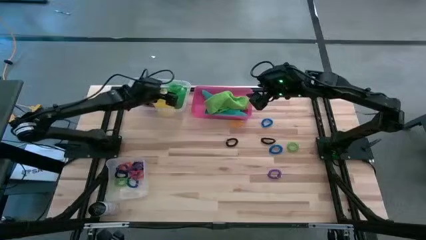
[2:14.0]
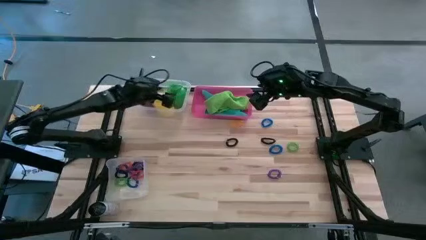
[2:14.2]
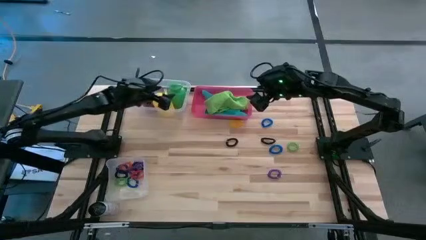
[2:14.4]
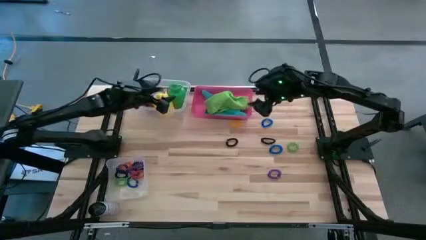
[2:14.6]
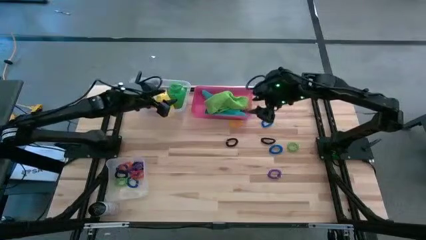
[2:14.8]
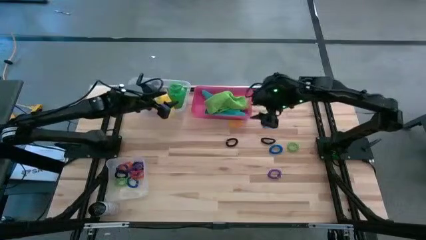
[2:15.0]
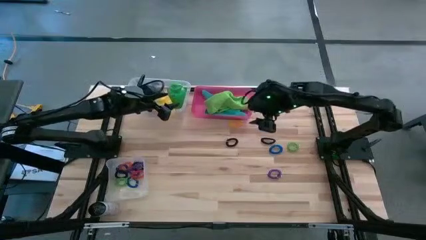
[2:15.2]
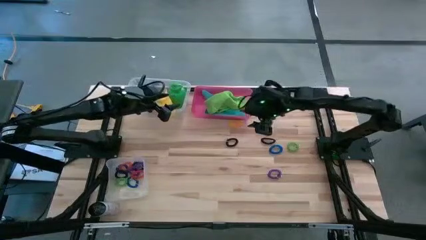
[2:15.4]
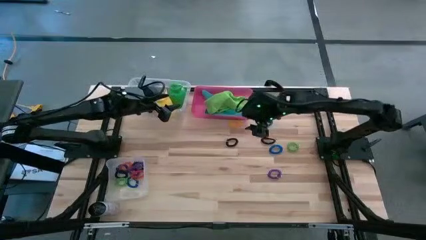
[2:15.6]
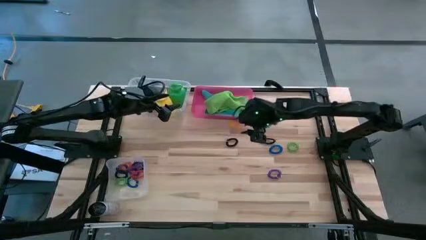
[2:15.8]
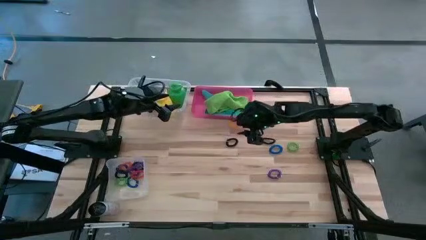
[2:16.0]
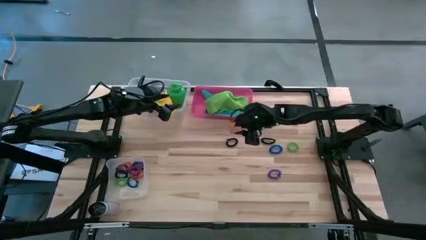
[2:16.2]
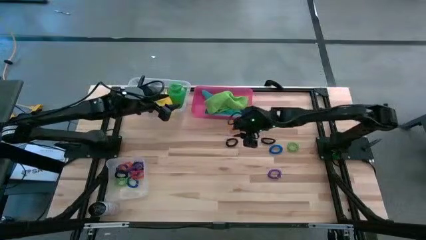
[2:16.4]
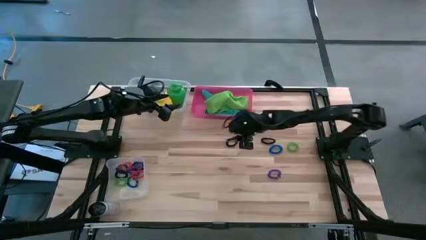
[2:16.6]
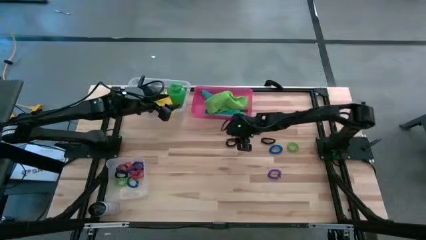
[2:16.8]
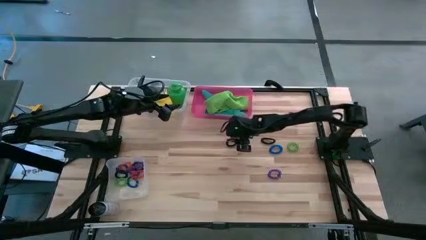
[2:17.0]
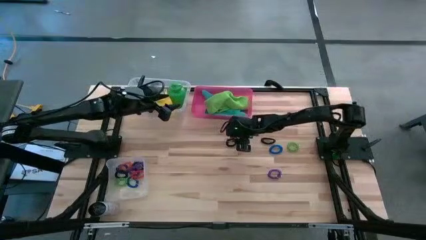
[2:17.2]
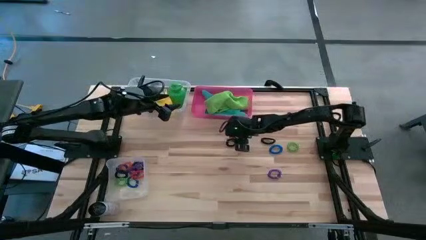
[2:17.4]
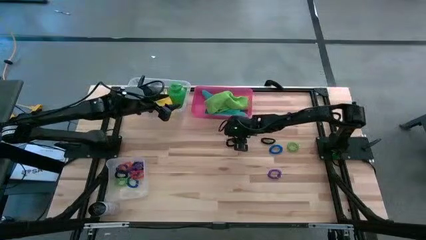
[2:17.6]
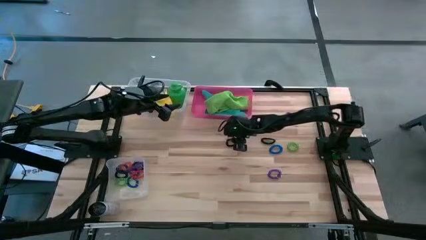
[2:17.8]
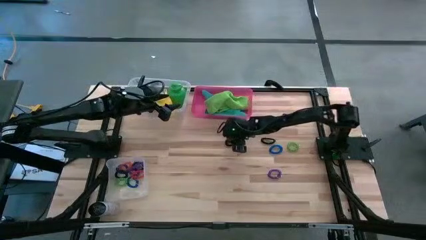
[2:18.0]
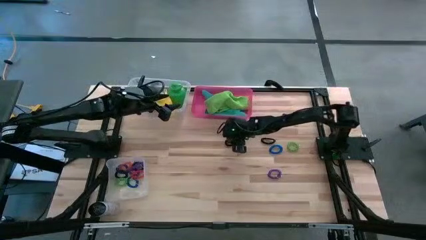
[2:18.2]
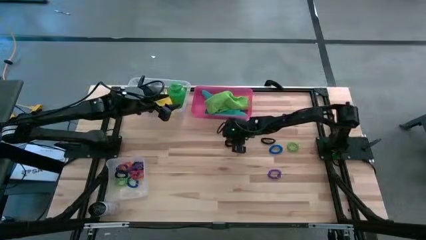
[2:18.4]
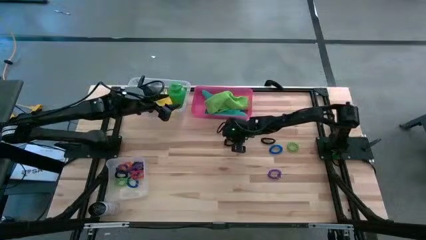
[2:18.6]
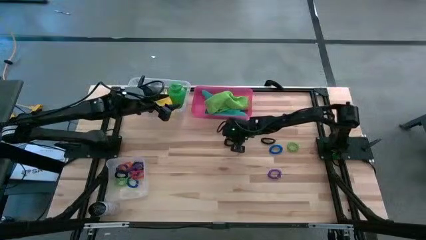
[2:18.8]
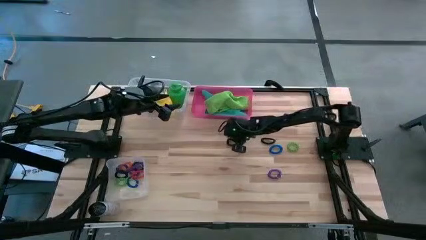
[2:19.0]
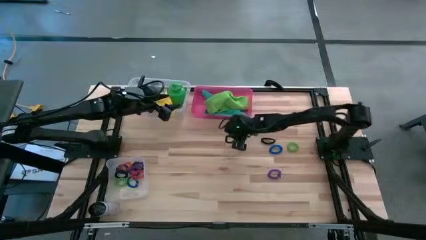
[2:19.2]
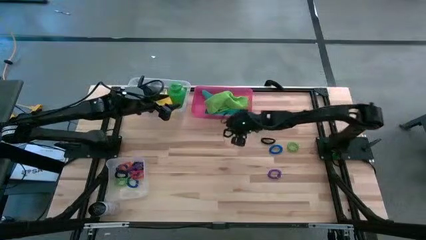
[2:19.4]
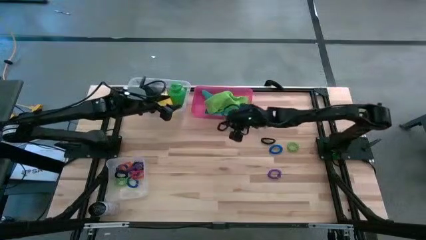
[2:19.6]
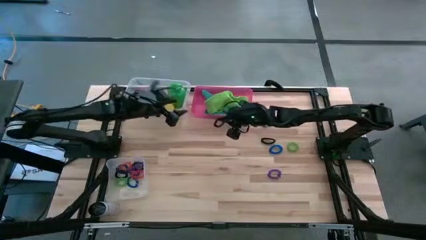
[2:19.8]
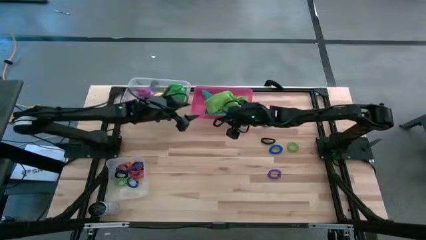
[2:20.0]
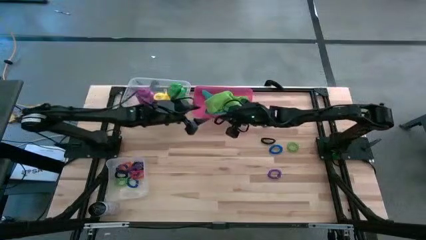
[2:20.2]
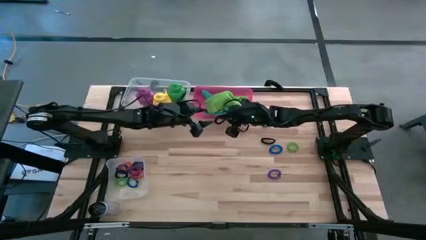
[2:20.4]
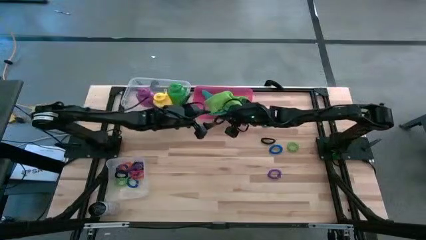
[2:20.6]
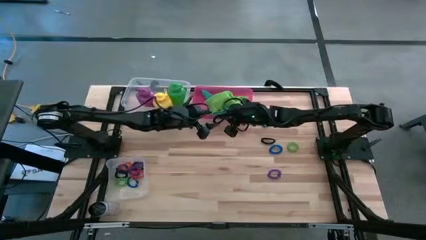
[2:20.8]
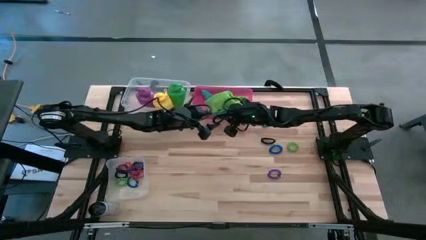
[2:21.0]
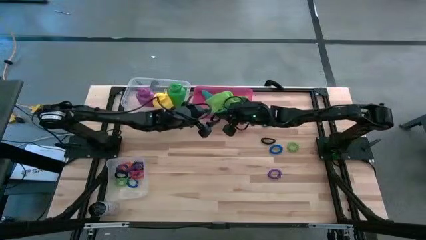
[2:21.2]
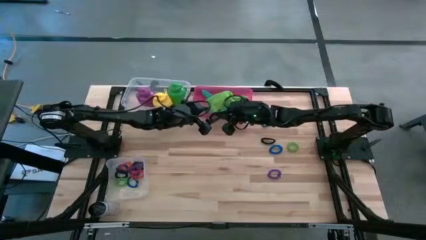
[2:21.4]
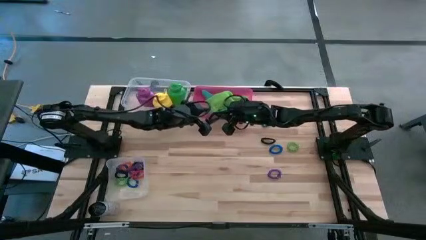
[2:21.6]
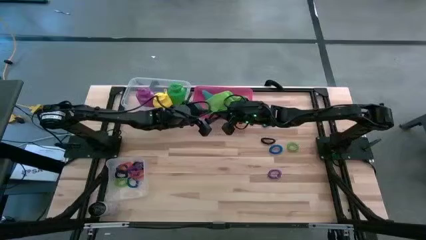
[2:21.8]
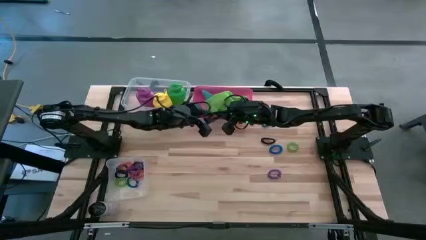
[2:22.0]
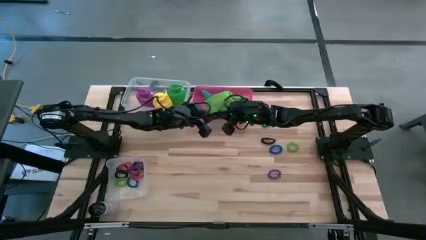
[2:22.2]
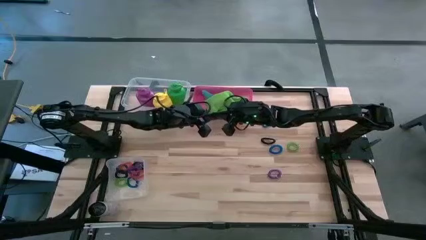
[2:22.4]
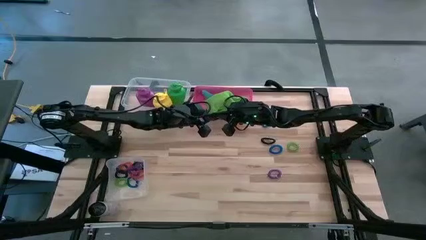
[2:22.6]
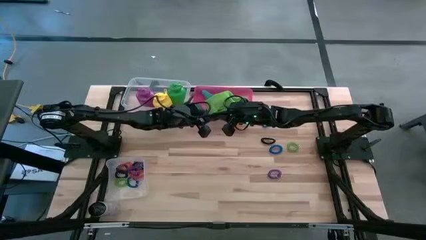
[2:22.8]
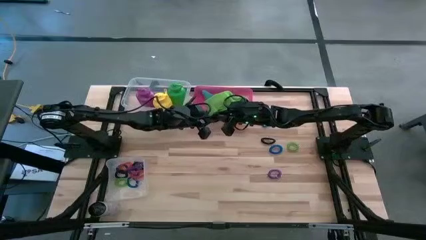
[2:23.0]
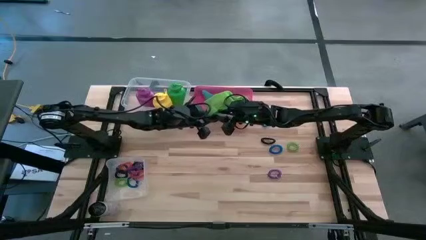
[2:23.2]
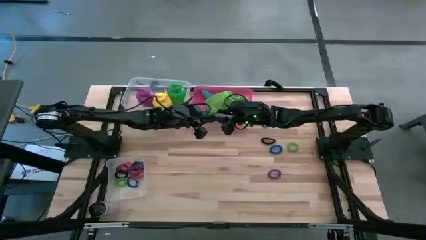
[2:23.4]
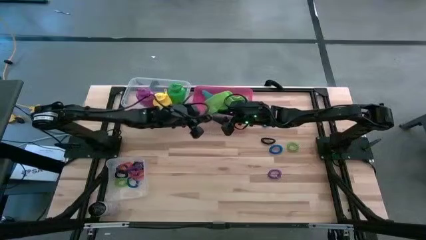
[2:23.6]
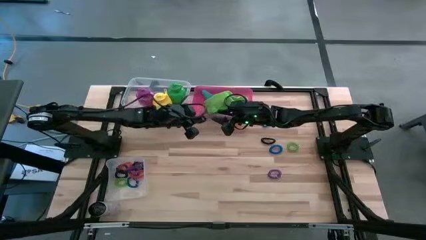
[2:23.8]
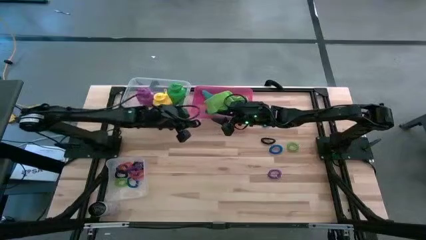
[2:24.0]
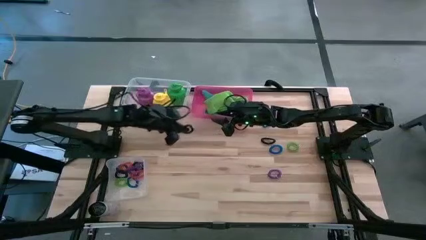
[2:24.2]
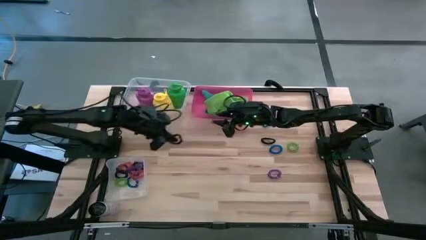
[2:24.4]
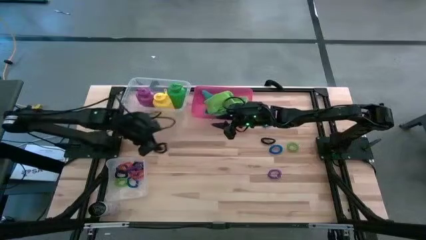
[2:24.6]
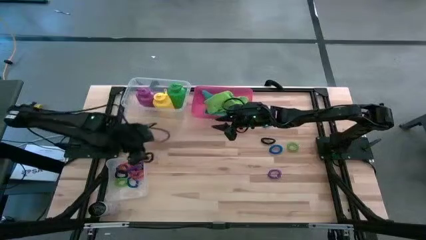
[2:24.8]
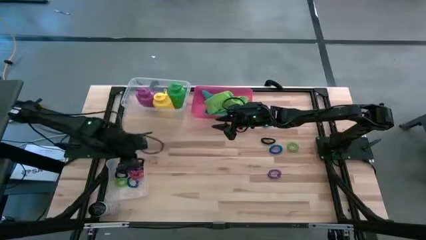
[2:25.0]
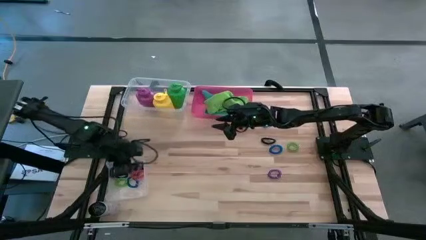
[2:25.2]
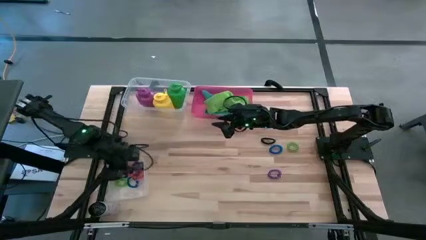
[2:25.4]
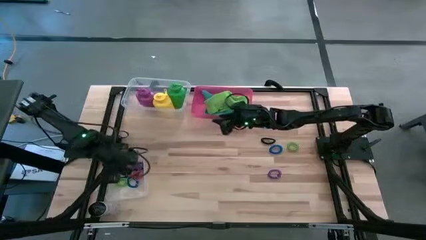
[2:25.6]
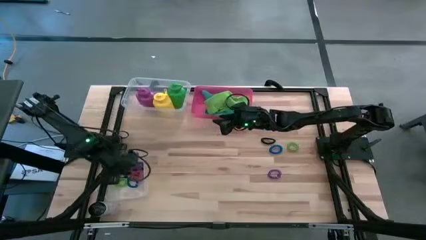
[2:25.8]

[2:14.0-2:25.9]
Task: Pick & Place Sports Items
Put the black spring keychain into the bottom transparent bin

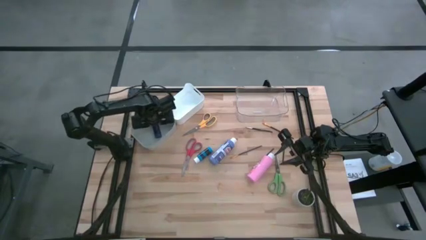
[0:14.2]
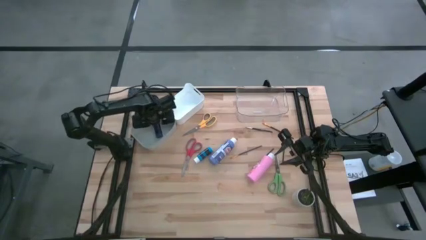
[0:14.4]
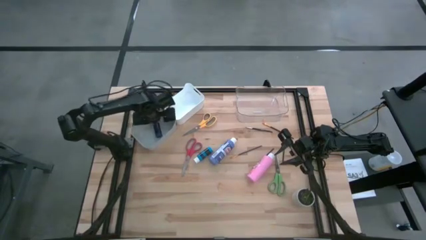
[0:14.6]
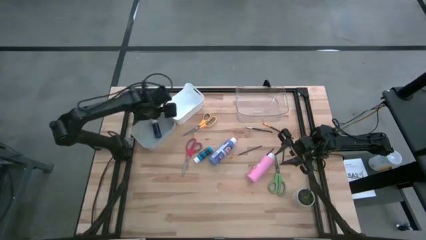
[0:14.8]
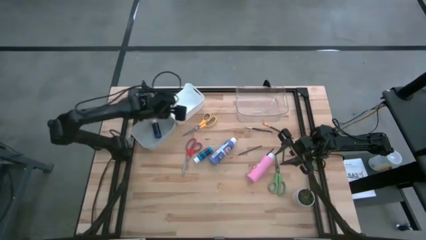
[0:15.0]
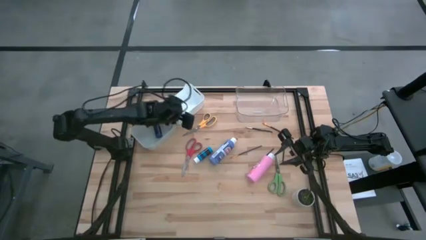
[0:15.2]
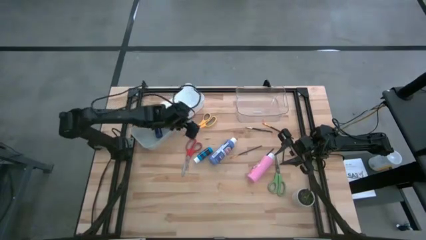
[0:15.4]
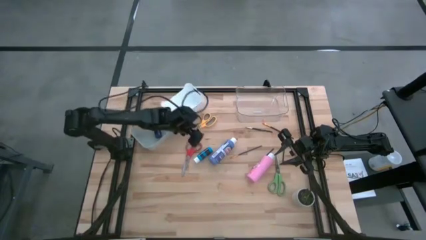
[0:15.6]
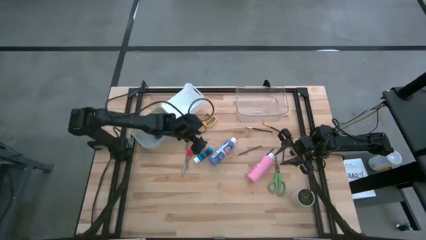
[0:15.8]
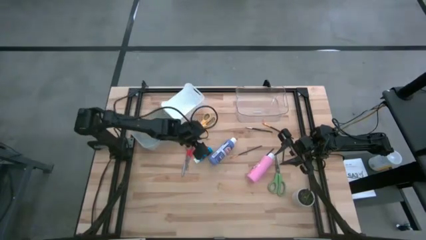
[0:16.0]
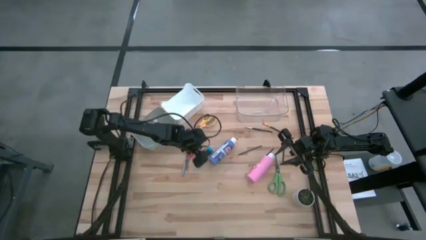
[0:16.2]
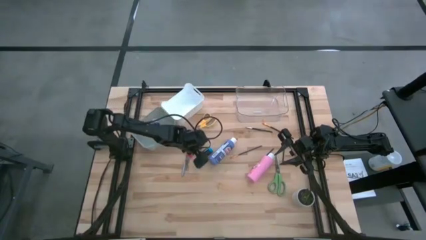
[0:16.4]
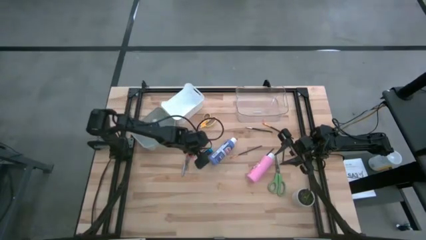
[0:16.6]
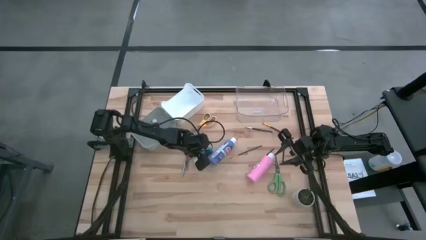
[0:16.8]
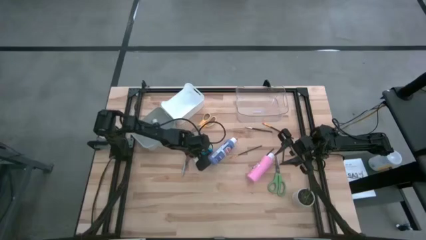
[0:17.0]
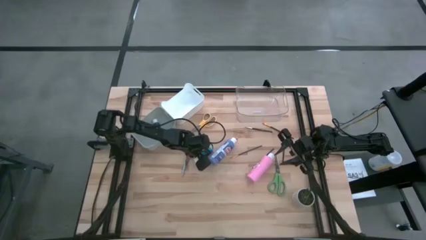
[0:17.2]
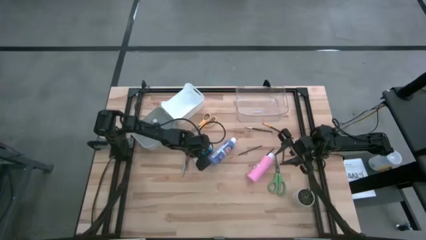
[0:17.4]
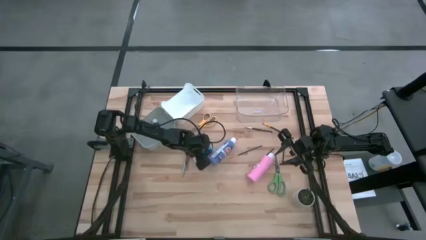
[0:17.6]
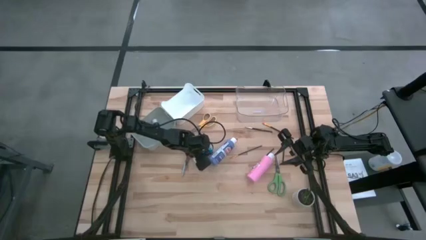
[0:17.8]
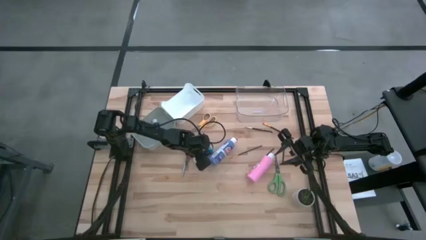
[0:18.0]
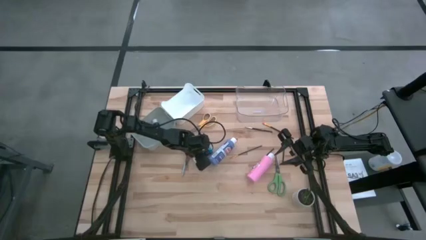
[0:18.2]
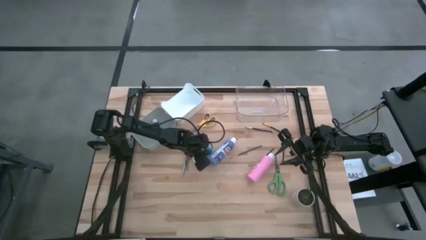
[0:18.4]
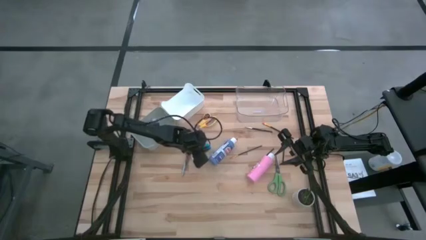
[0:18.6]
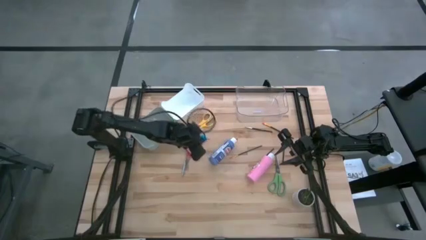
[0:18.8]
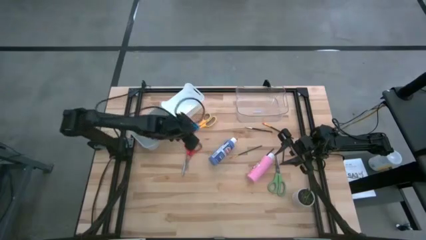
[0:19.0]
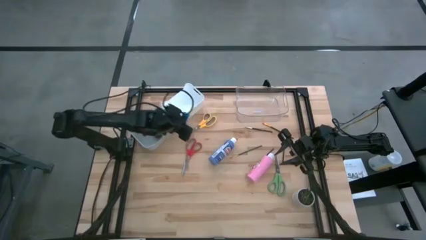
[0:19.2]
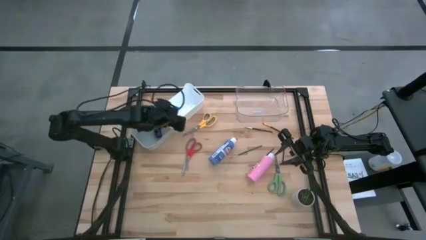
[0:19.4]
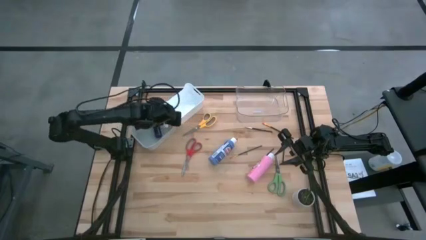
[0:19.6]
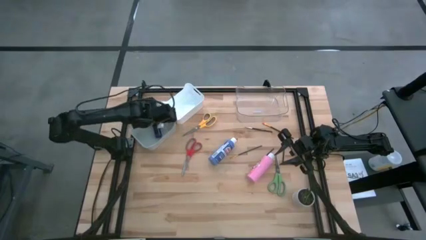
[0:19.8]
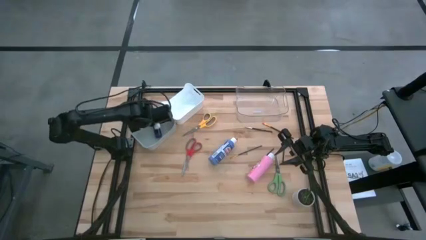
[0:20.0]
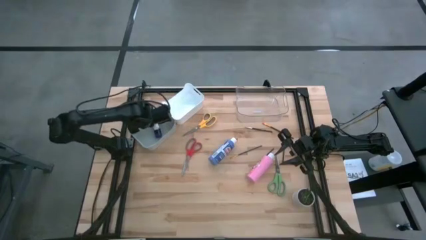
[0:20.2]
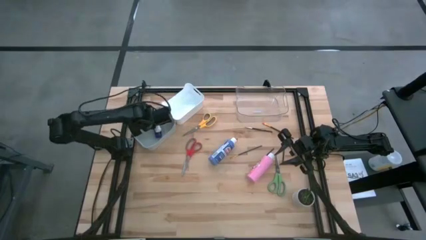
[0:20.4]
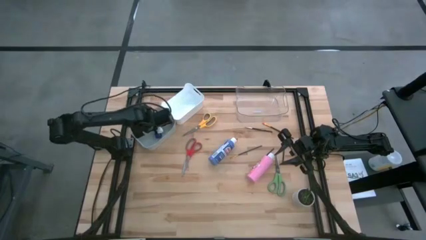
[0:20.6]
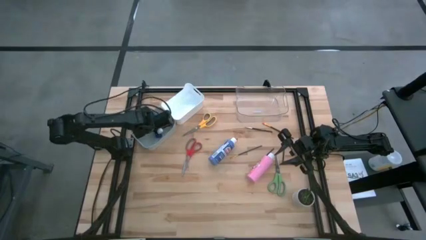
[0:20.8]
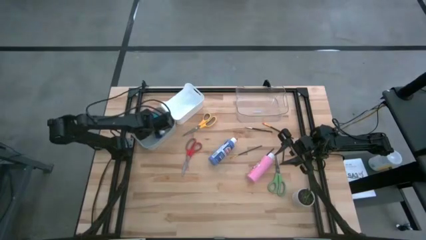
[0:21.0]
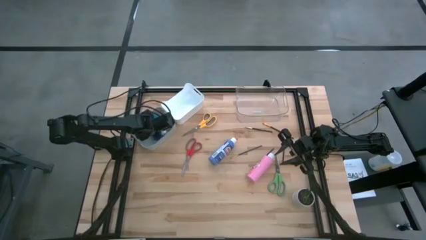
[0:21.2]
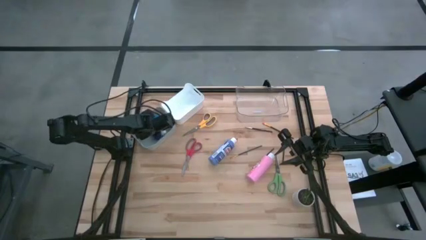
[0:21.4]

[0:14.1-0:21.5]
Task: Pick & Place Paint Supplies
Put the blue black paint bottle into the gray bin
